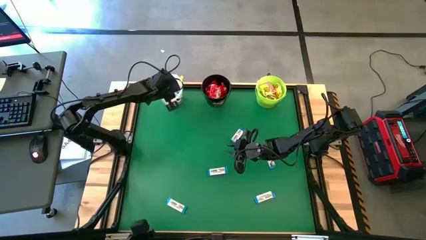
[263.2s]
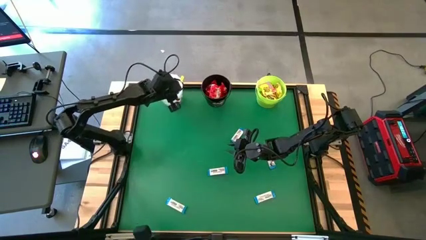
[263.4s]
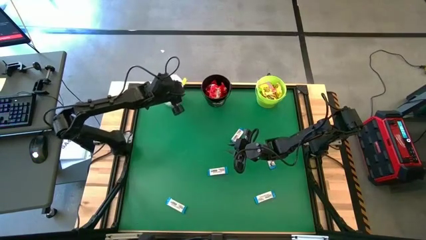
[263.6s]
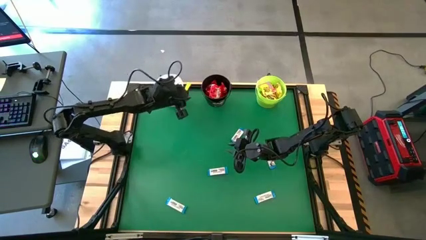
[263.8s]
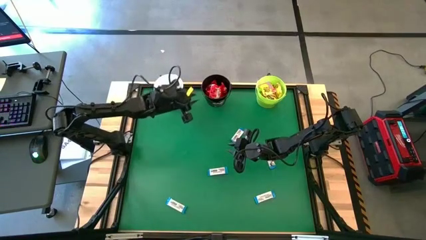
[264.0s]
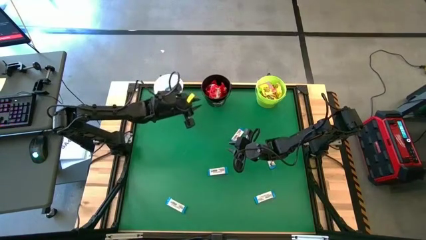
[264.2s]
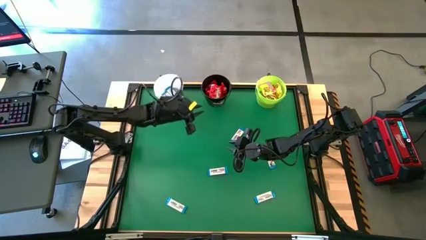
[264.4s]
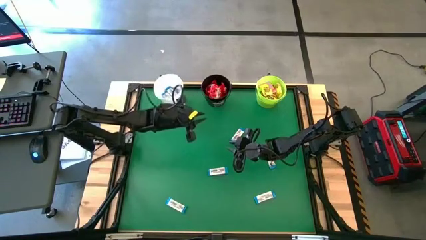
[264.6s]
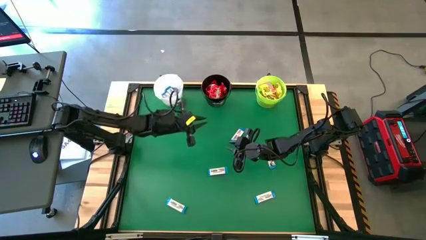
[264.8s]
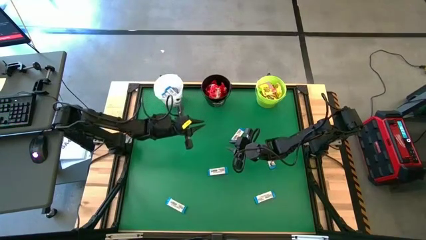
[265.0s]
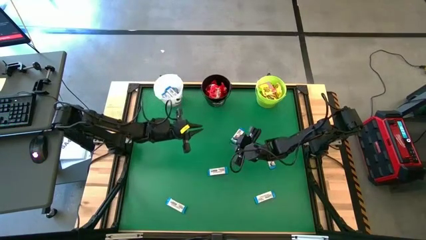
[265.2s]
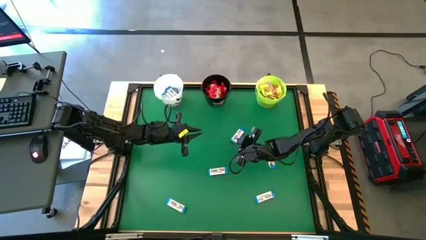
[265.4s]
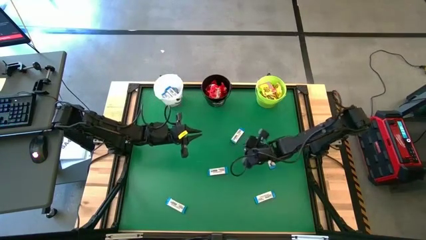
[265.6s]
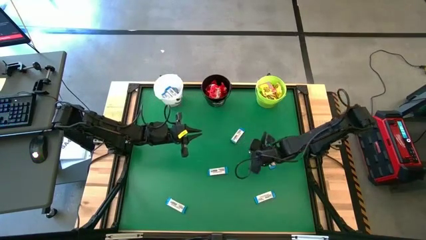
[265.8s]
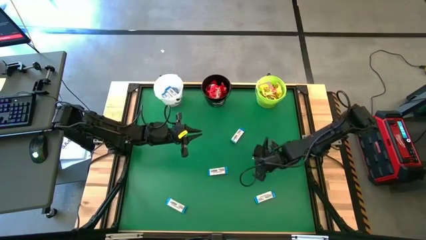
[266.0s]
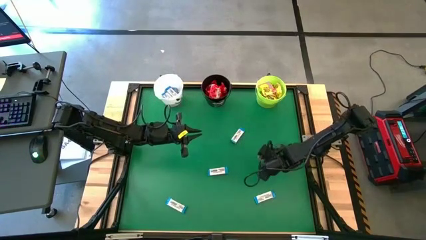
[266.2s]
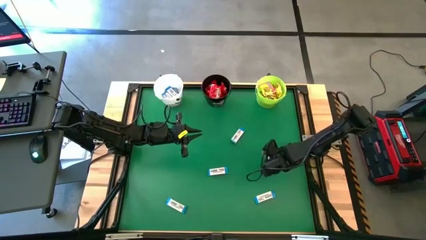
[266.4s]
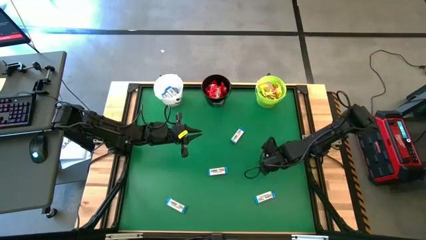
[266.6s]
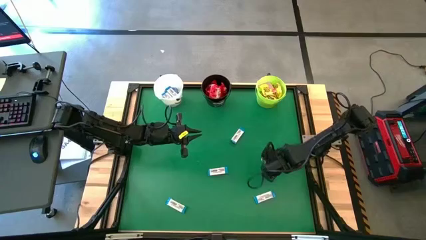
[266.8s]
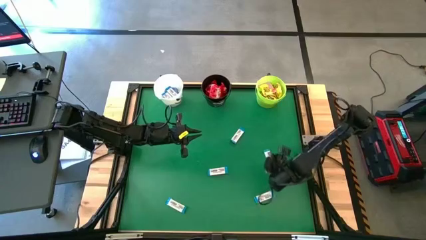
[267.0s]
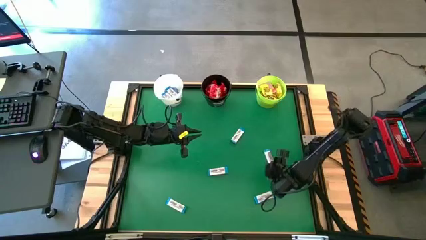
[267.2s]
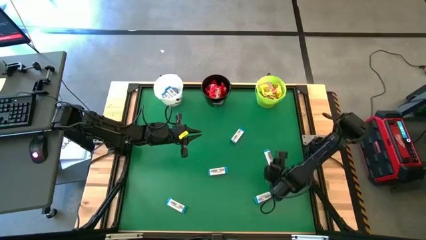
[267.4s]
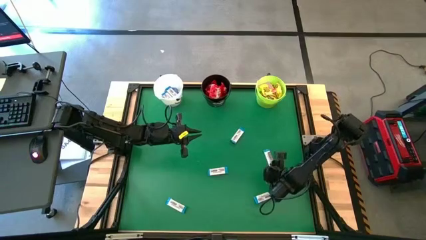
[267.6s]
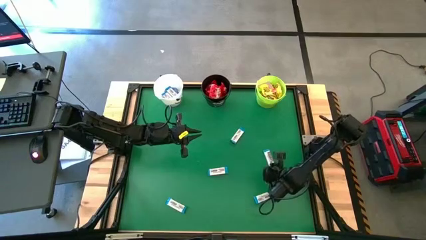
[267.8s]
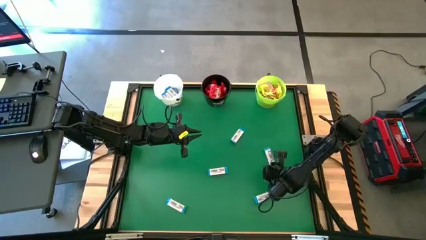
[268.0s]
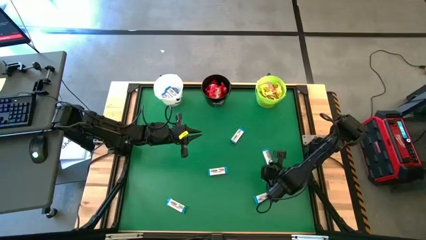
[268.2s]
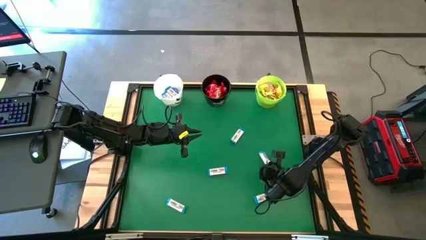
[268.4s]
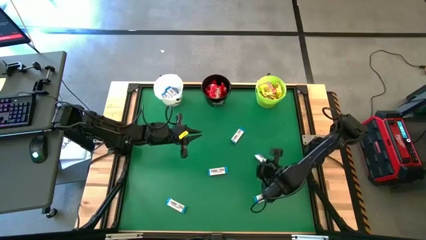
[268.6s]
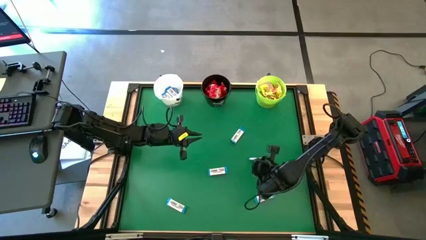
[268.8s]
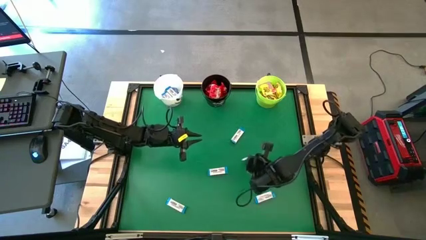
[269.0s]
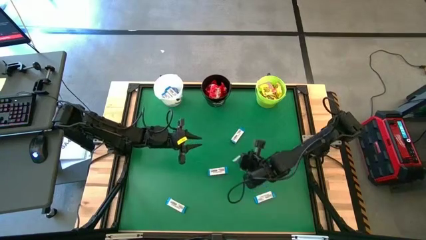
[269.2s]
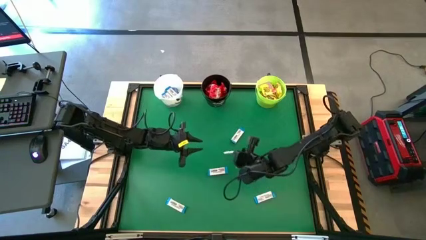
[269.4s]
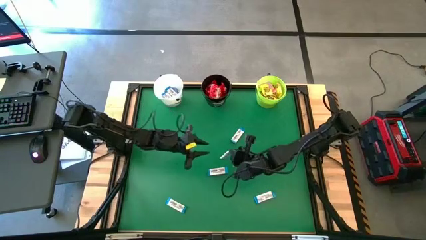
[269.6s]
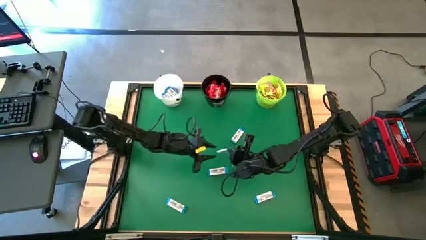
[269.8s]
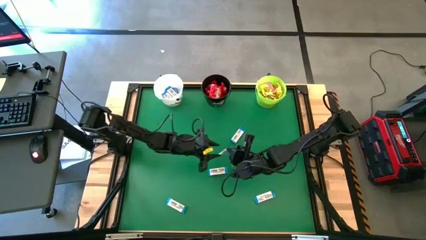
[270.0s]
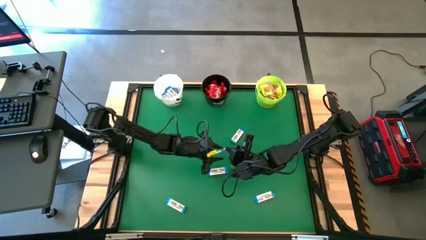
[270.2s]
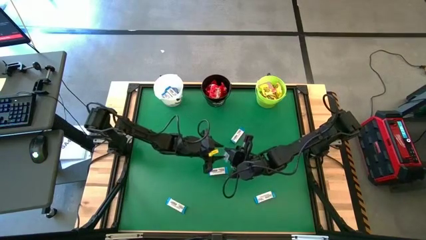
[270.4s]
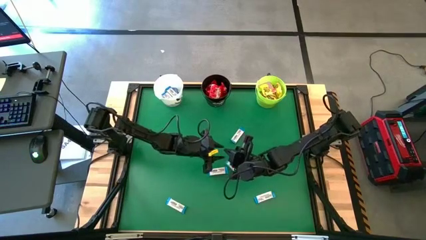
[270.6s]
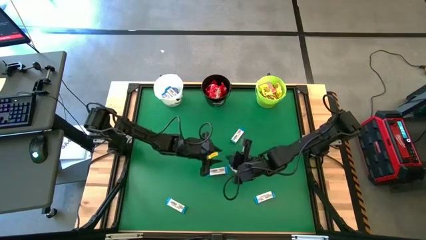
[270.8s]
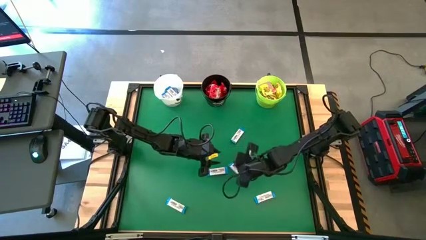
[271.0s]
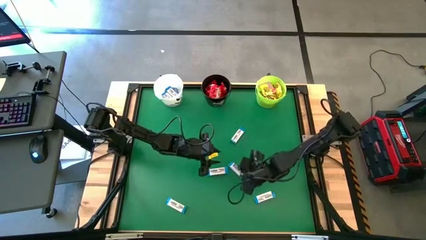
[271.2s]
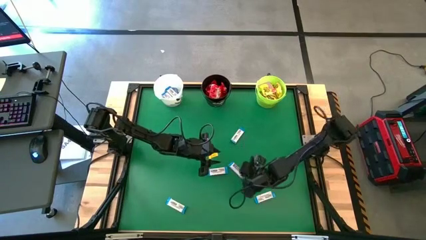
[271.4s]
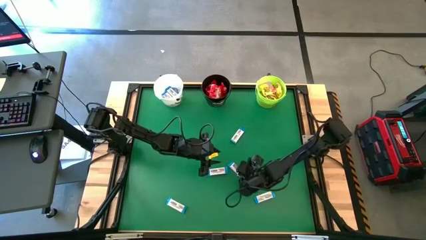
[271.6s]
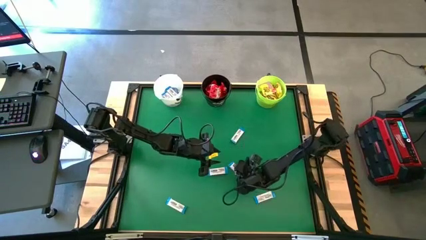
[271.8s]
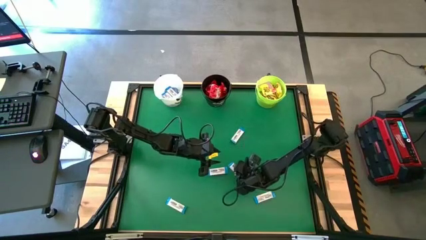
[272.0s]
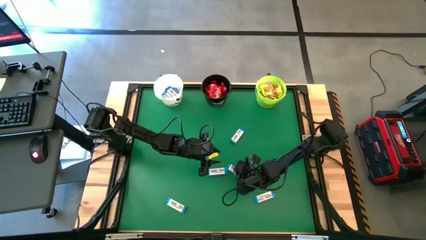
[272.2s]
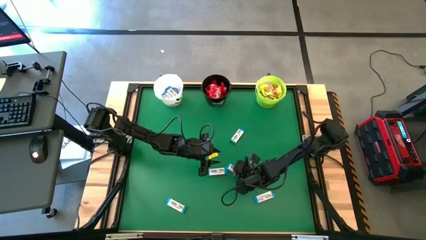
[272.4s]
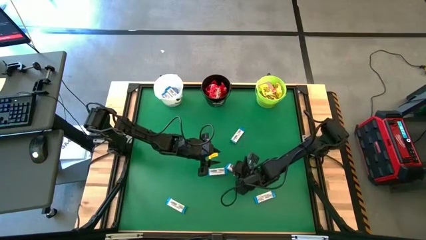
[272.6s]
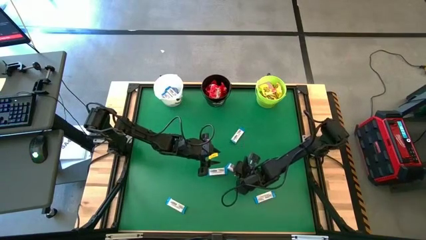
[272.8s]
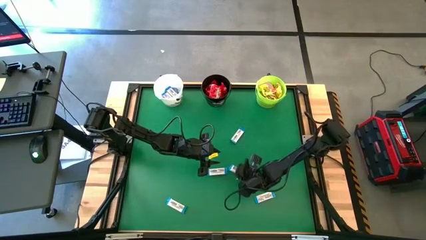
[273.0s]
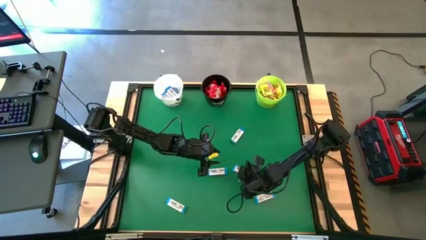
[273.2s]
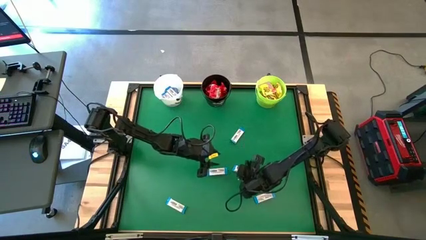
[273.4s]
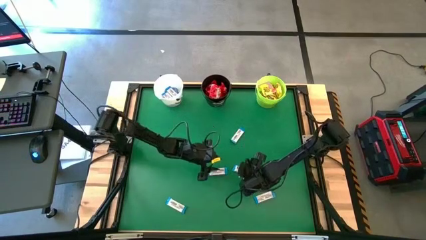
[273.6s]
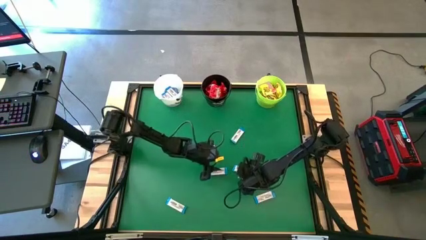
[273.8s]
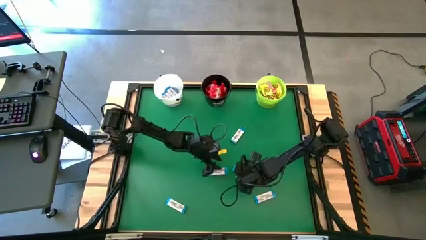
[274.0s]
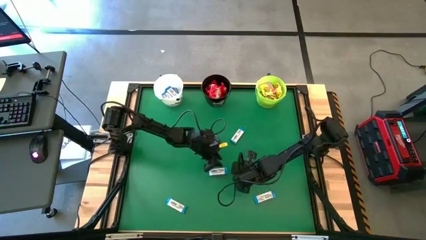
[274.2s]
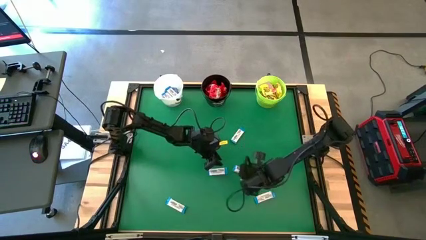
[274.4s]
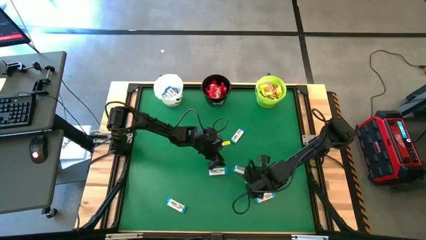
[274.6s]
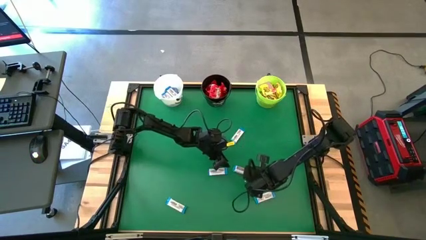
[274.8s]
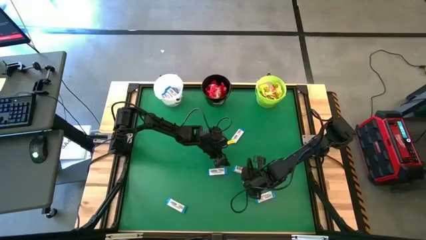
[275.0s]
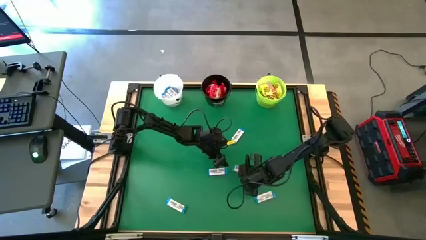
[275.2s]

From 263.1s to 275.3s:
Task: Sort candy by brand, put in halloween buckets
Put the white chocolate bar into the white bucket

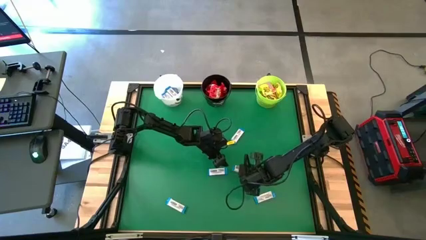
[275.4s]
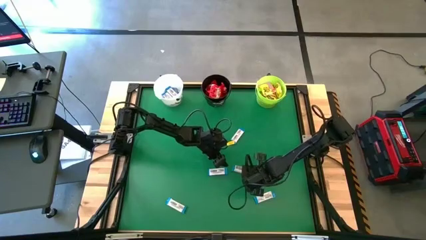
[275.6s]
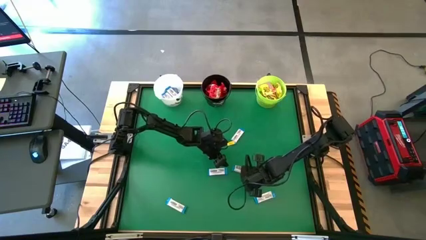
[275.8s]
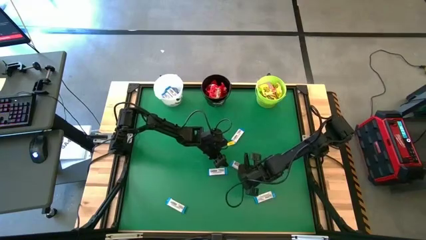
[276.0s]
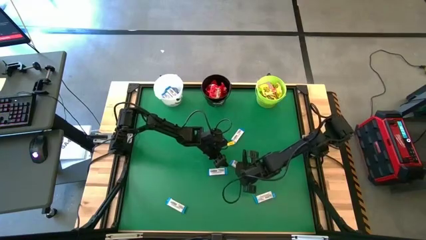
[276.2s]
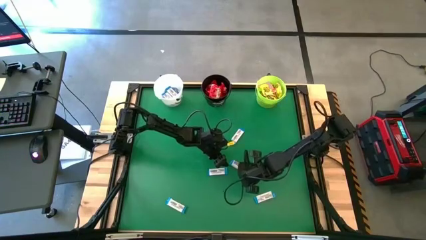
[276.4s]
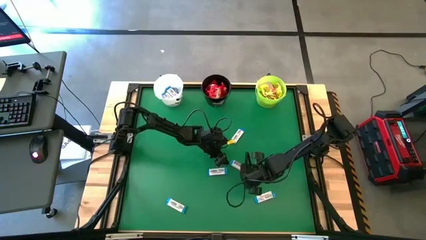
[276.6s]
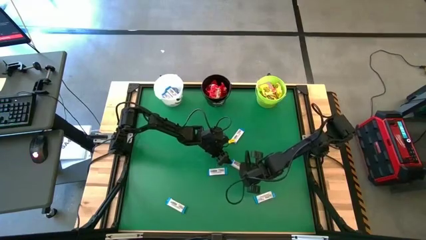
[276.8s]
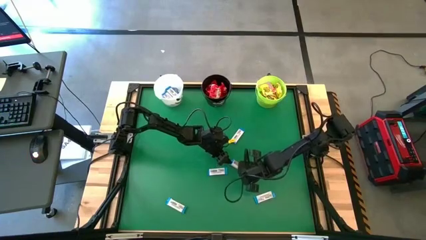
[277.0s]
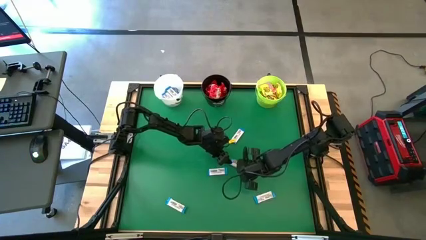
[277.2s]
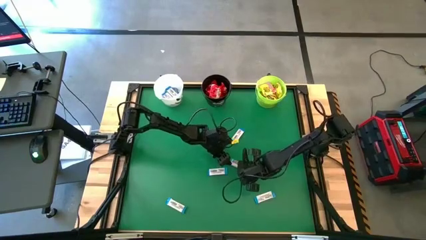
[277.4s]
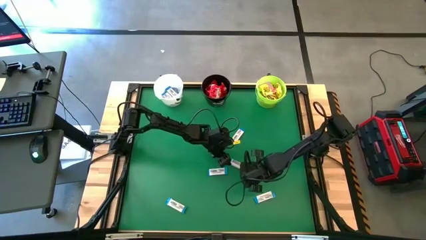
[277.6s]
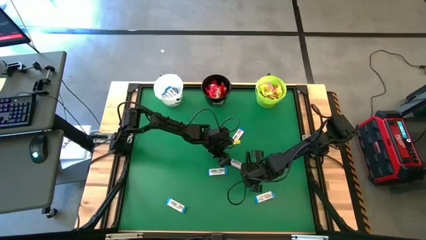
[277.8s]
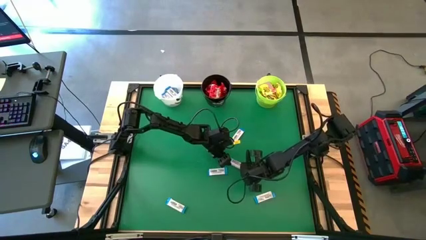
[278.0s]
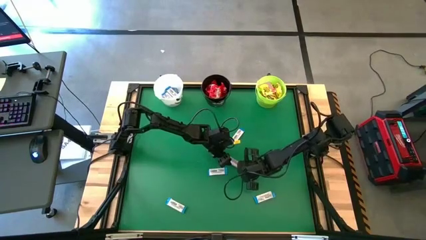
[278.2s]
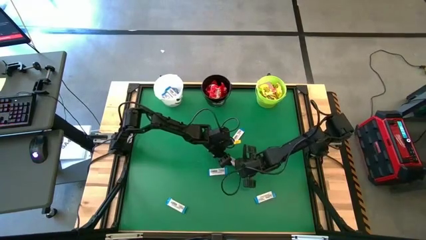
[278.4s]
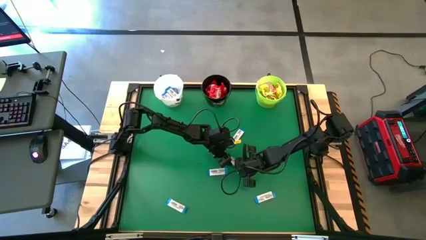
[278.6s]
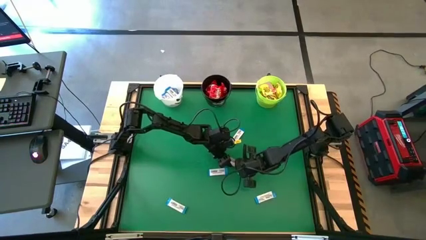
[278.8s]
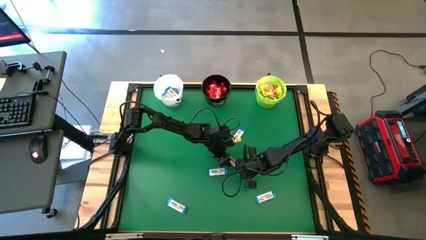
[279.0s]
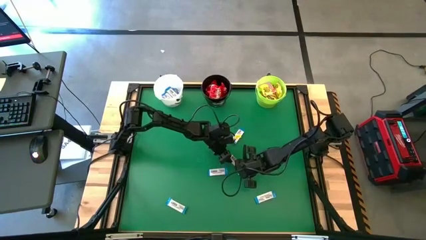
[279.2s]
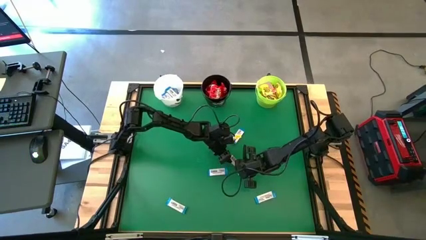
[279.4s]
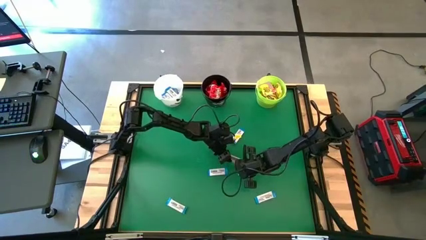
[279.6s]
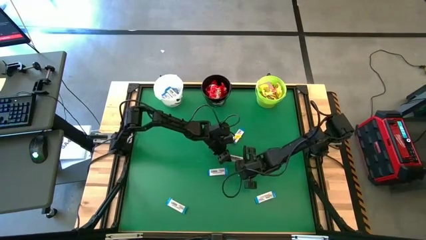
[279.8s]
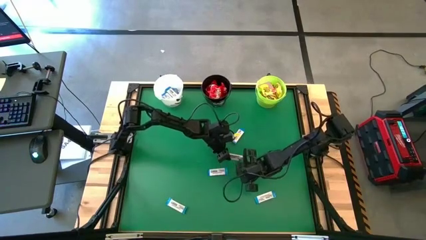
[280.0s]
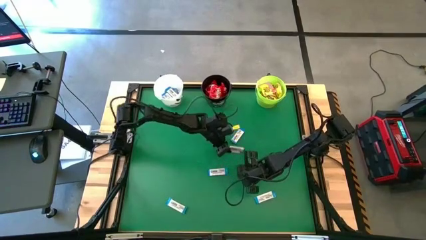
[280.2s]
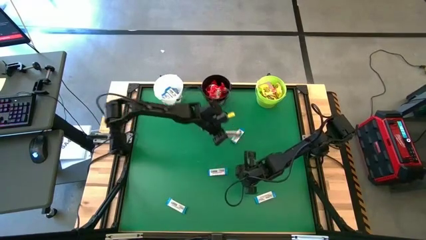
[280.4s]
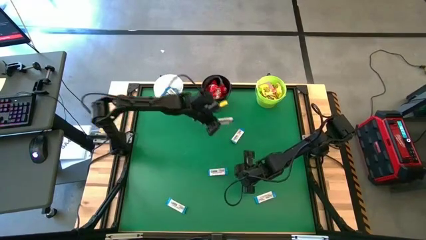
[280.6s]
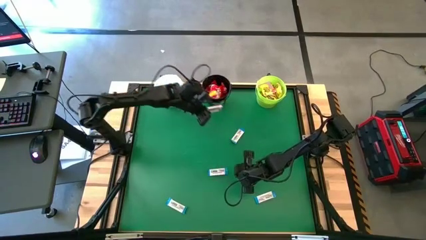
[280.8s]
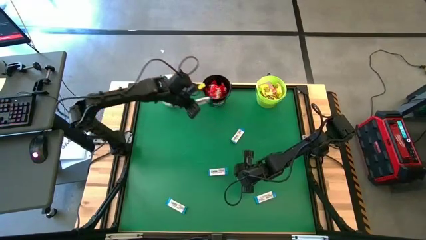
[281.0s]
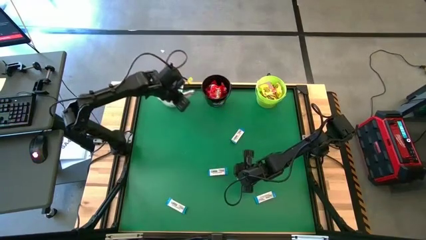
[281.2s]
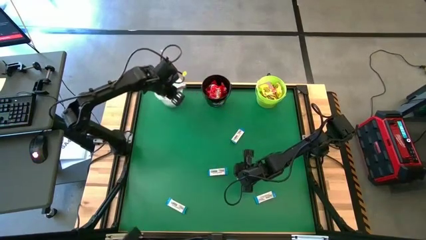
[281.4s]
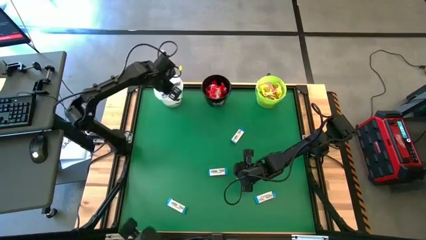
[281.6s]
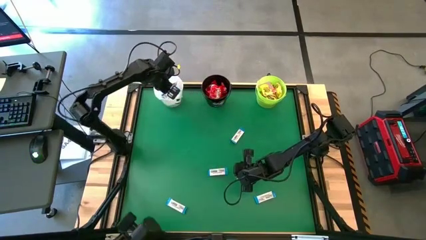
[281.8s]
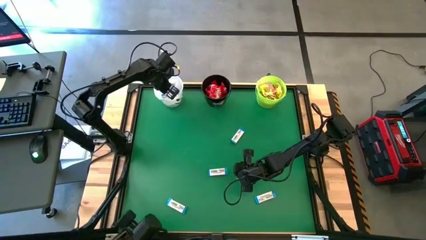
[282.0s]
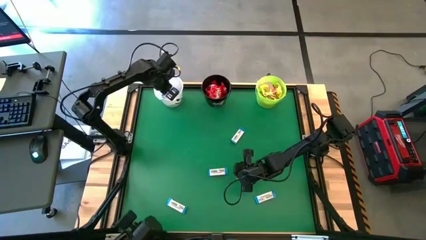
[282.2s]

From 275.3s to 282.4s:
Put the white chocolate bar into the white bucket
